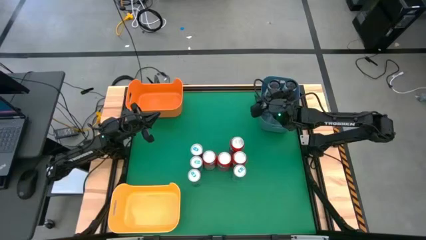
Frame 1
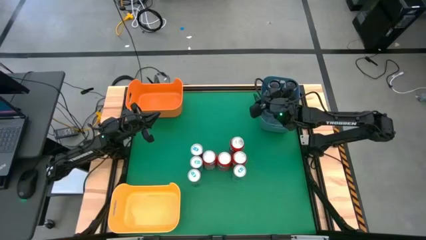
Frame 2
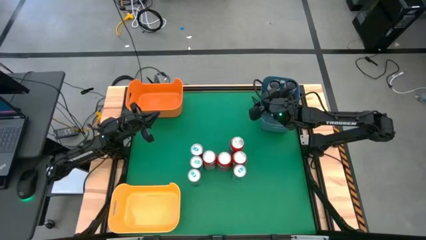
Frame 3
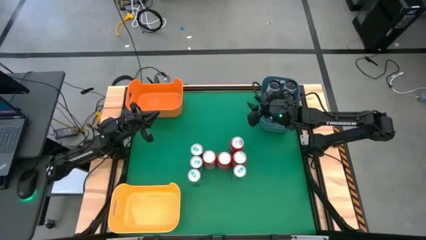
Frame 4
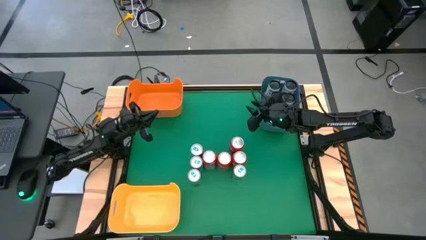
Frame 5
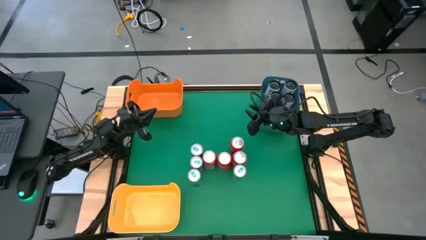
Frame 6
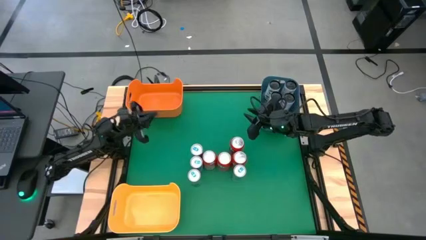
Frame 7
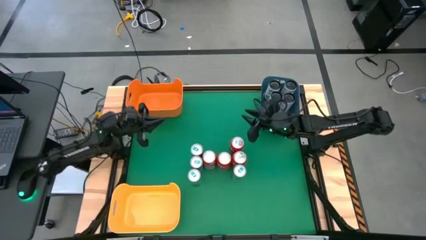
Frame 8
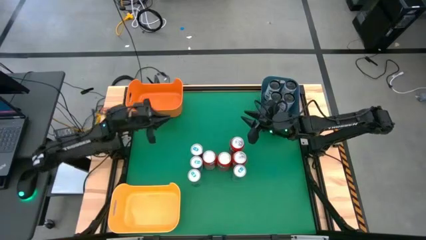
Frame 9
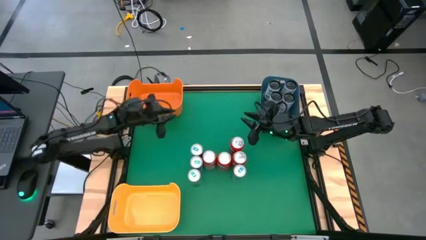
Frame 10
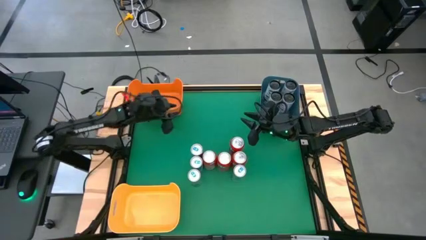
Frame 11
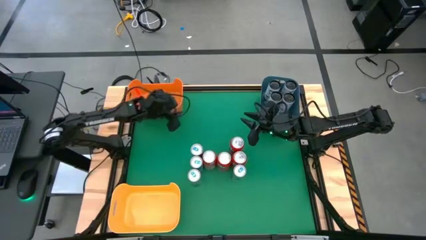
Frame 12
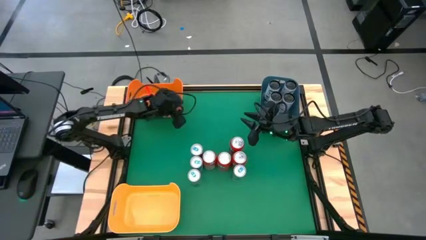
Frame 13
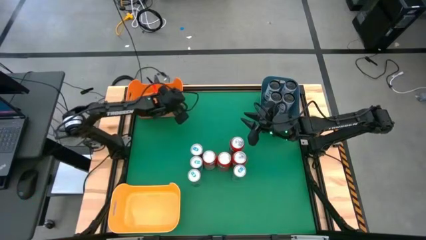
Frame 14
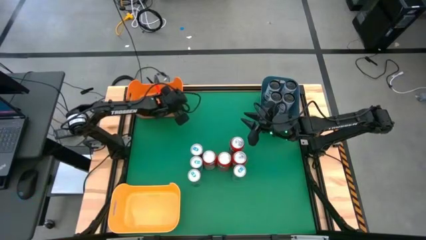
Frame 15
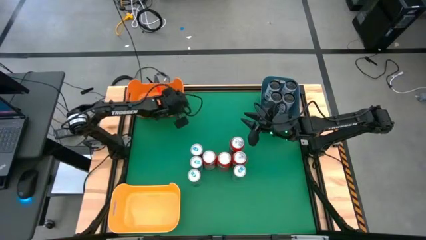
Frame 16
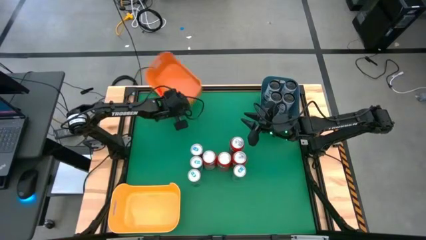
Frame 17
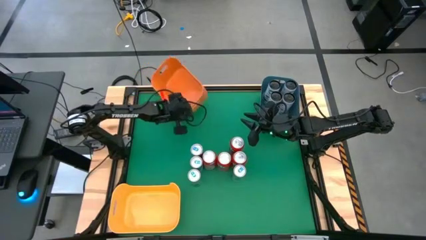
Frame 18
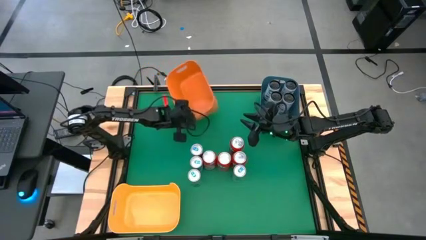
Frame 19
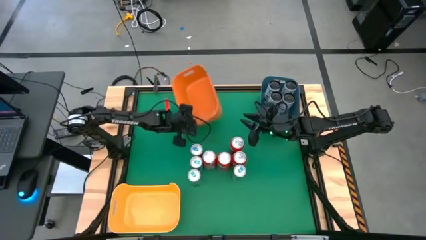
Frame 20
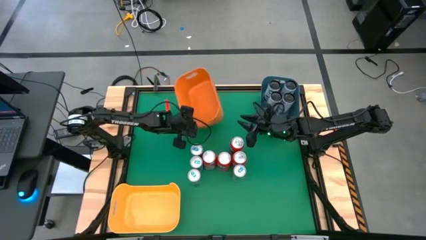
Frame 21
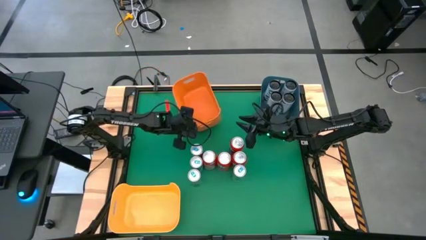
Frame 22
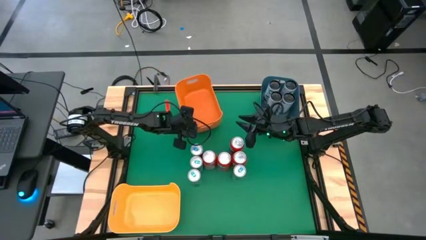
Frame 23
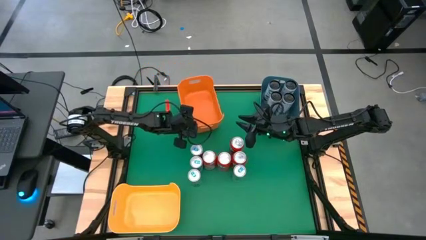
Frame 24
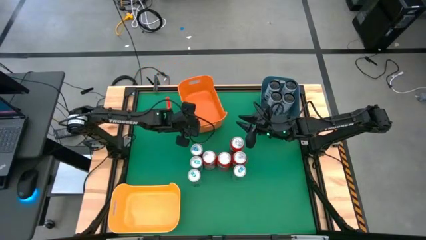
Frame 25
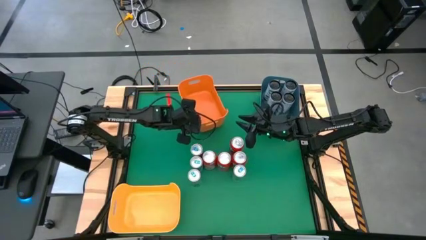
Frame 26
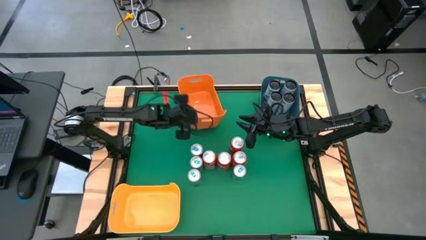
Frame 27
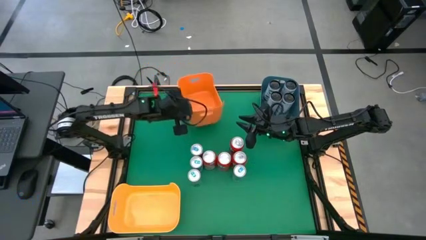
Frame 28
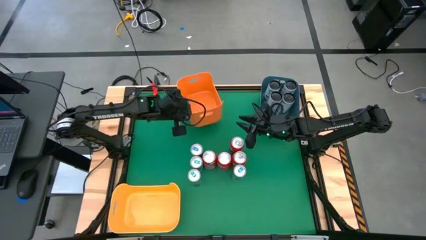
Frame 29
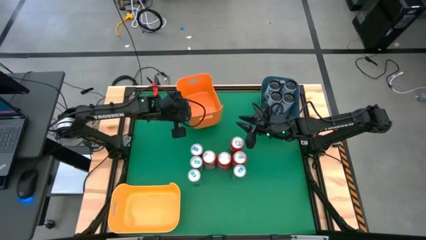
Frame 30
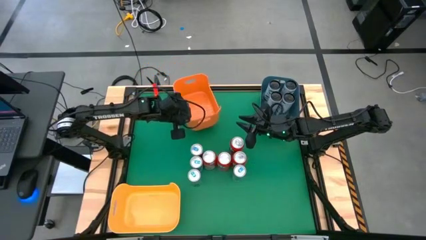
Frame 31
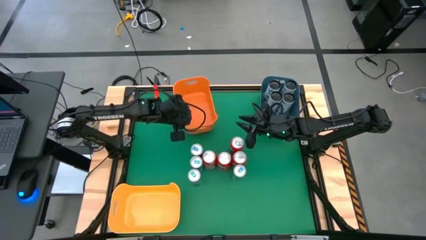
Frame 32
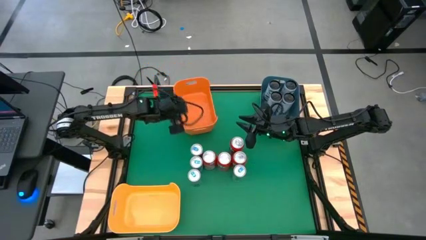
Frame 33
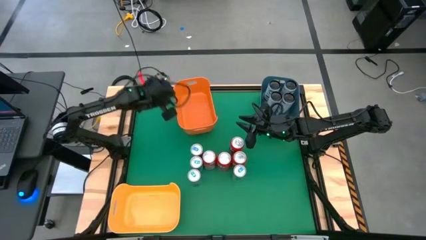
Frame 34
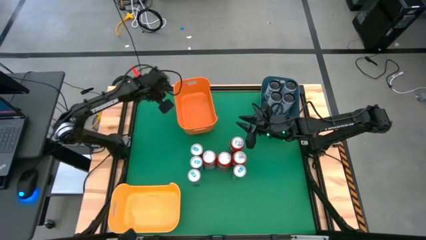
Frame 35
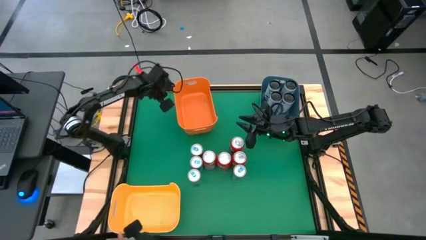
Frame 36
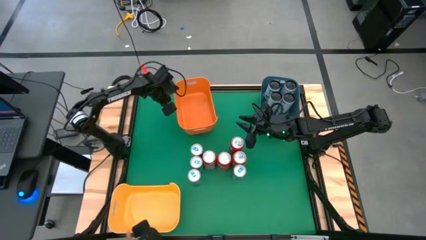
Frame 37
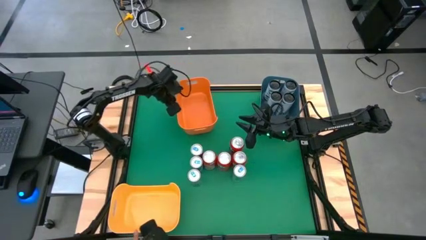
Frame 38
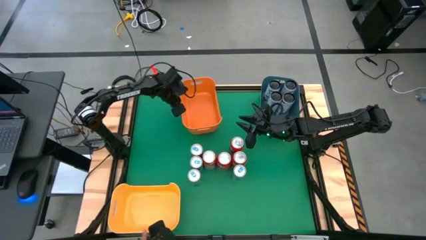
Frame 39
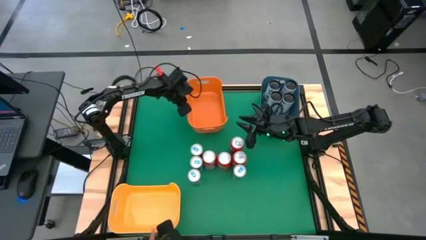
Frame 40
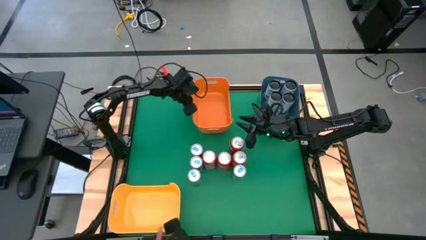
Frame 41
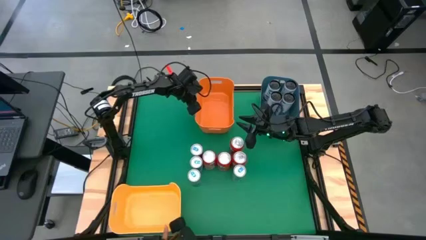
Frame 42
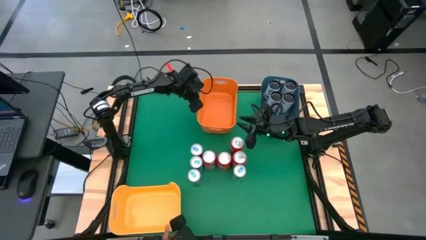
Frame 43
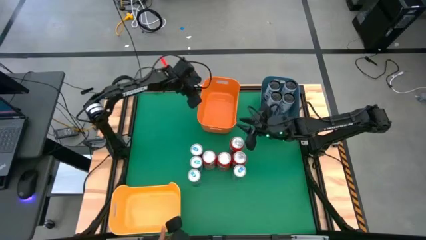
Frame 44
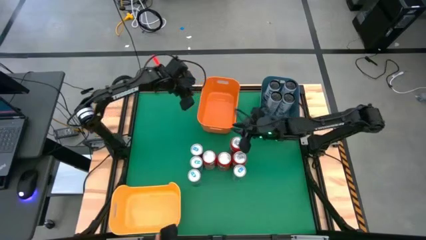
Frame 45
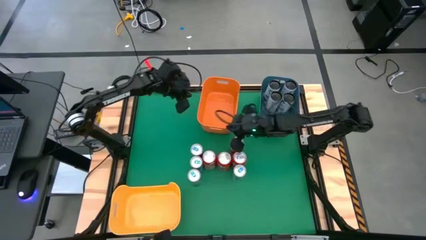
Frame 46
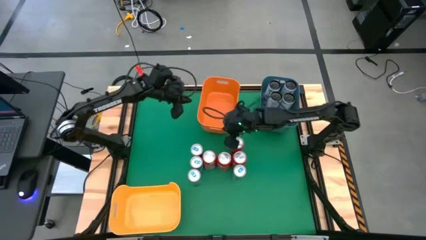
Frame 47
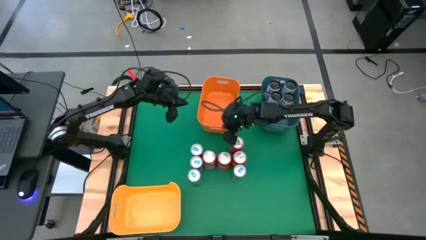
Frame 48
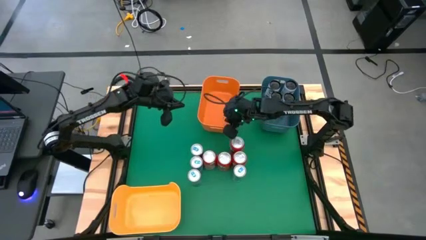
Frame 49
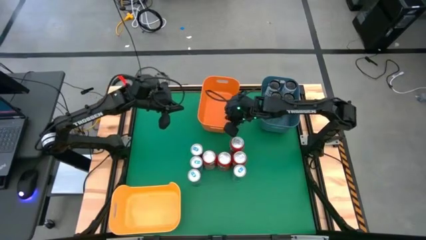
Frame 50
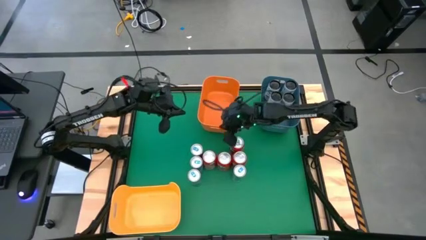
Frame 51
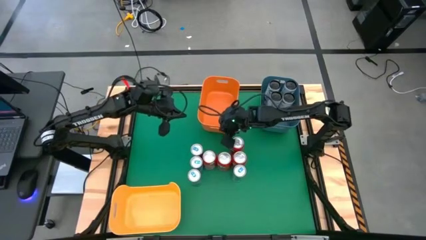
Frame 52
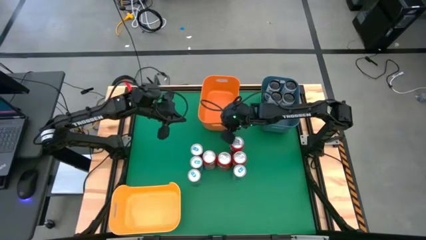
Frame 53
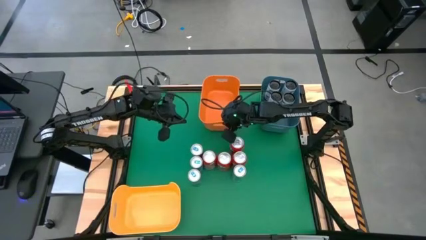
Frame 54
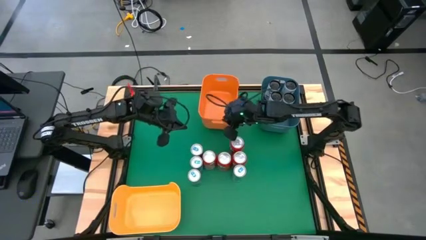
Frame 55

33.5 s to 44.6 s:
Task: Sort soda cans
Move the orange bin to the top center of the table

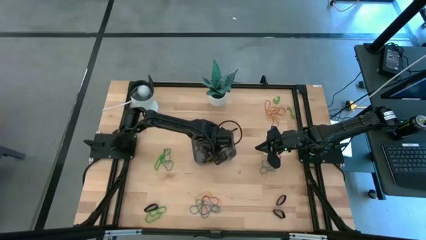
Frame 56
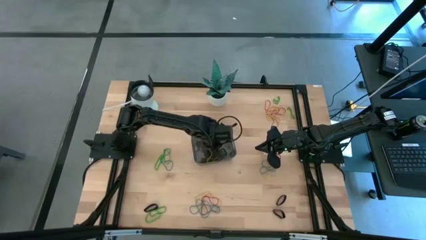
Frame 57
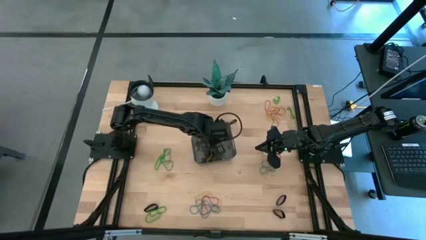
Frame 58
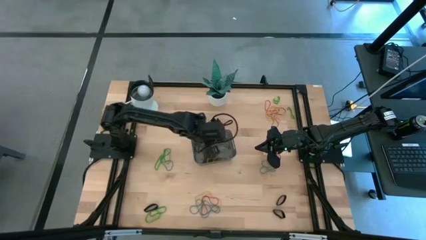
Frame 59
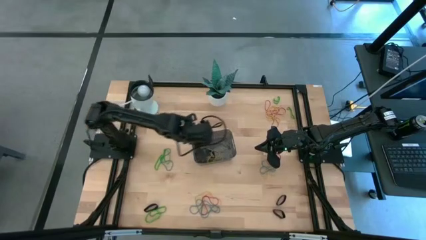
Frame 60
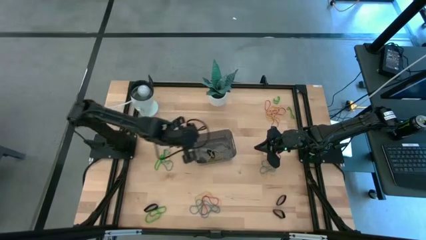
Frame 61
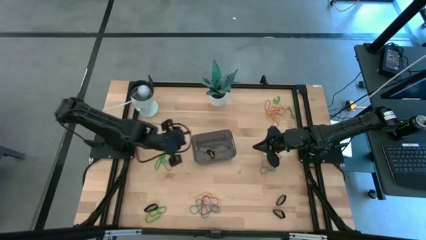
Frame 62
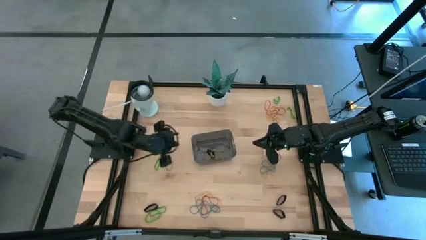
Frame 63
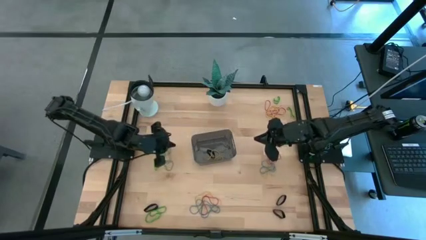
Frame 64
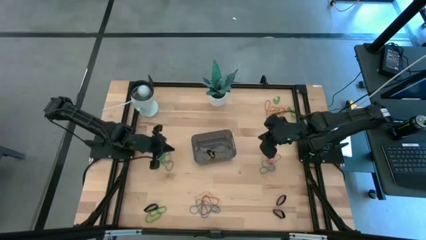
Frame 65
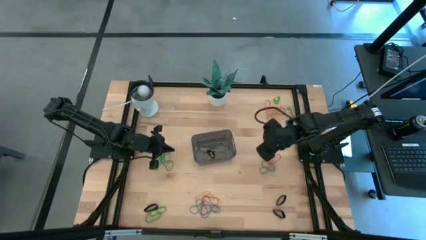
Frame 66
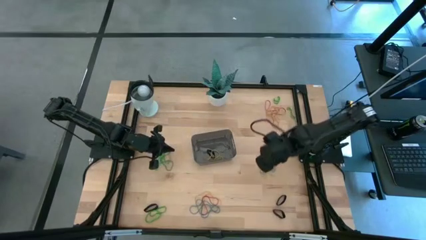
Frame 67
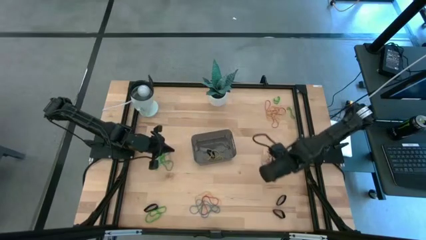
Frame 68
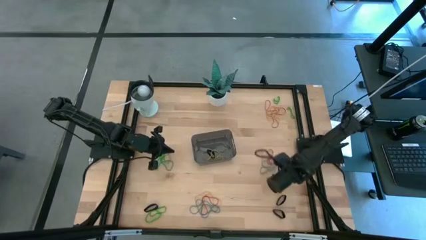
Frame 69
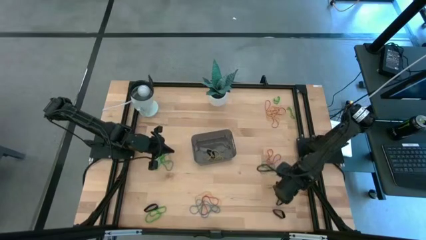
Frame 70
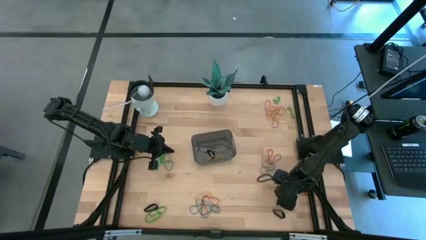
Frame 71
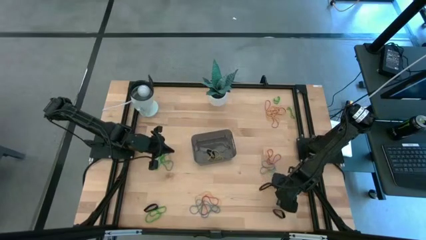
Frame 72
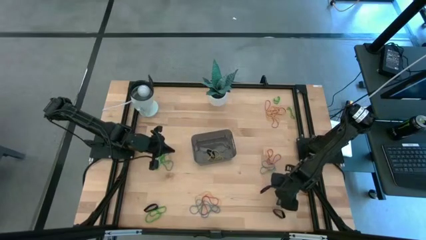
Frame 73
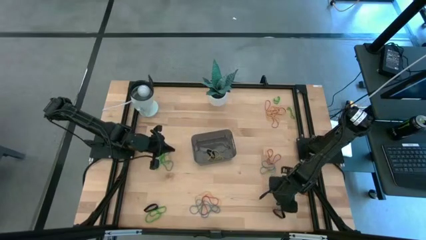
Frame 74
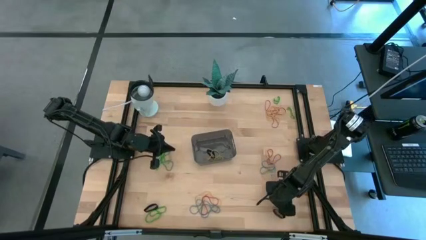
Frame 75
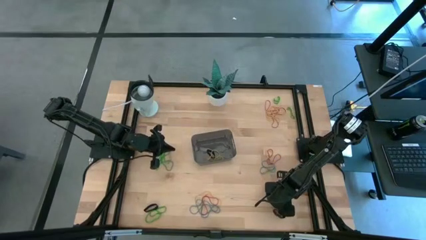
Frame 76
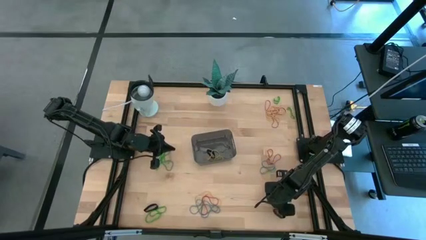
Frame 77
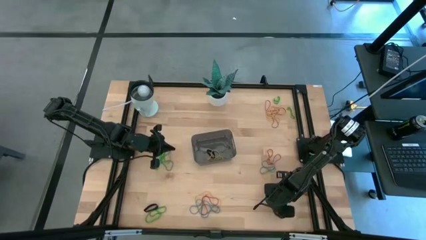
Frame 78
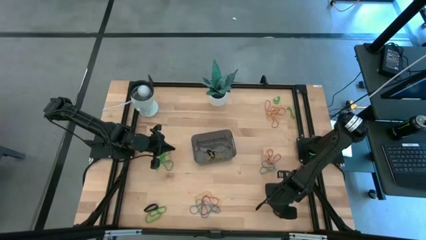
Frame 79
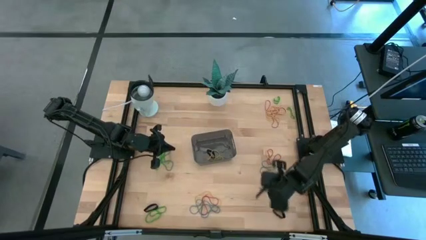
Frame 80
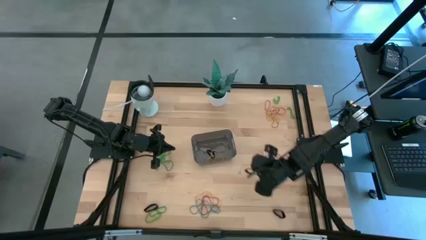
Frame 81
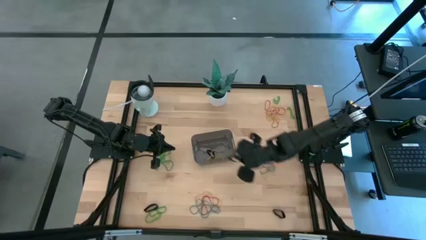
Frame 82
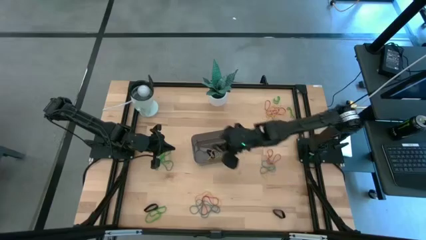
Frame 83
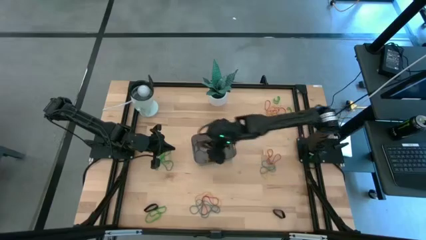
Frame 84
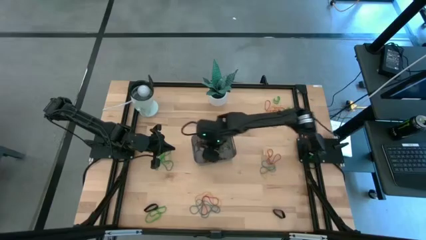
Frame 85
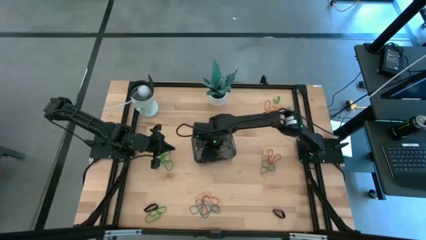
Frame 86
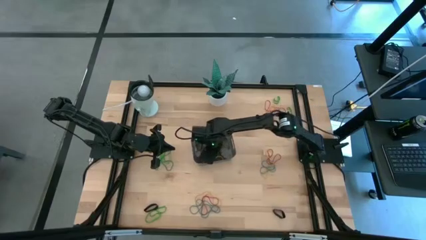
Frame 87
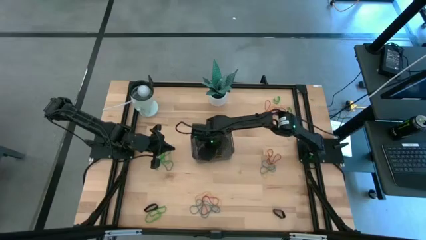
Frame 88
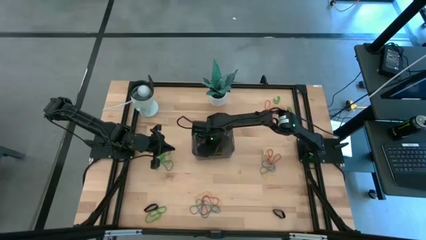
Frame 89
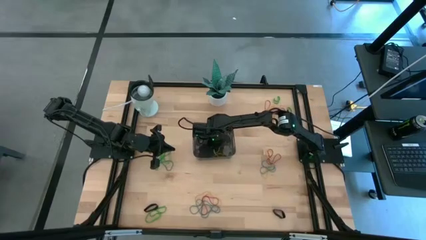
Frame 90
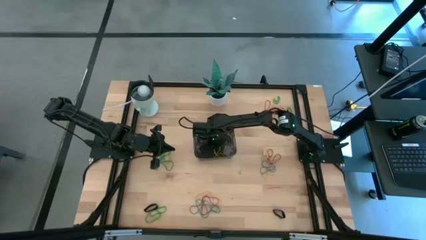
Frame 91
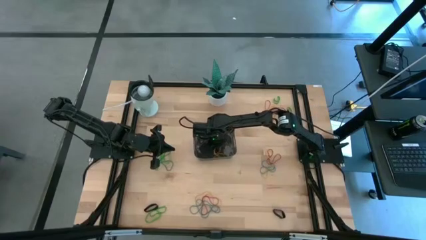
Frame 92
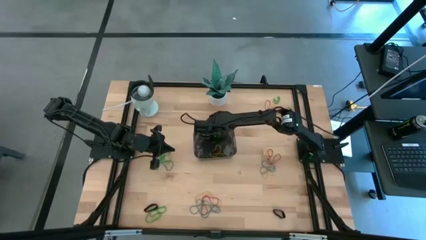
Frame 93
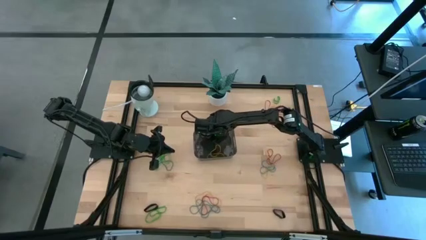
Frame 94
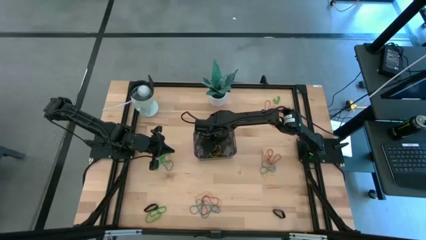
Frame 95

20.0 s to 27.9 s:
Task: Pick and place rubber bands into bin
Put the black rubber band into the black bin
